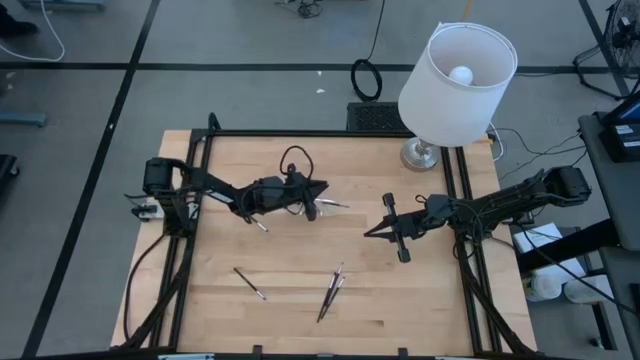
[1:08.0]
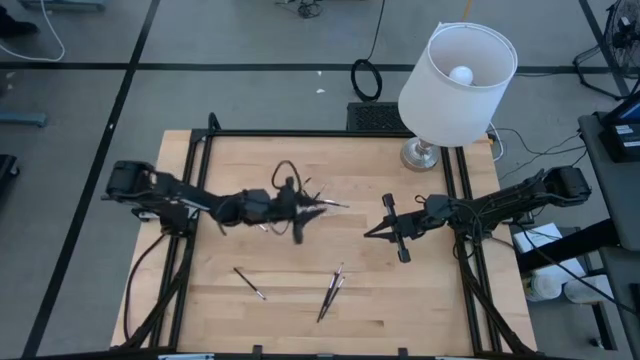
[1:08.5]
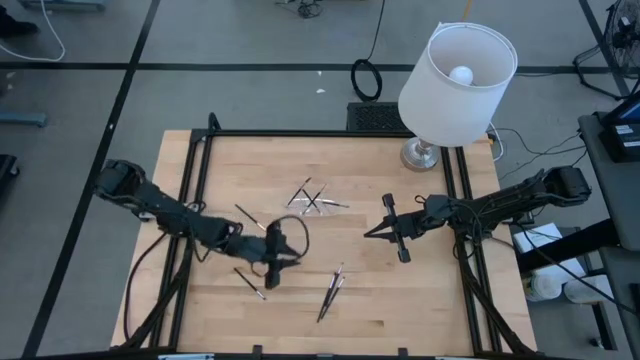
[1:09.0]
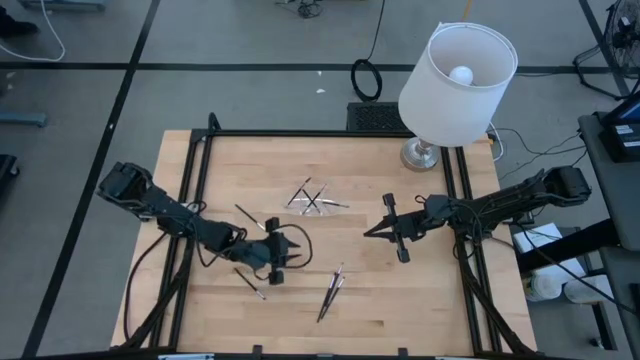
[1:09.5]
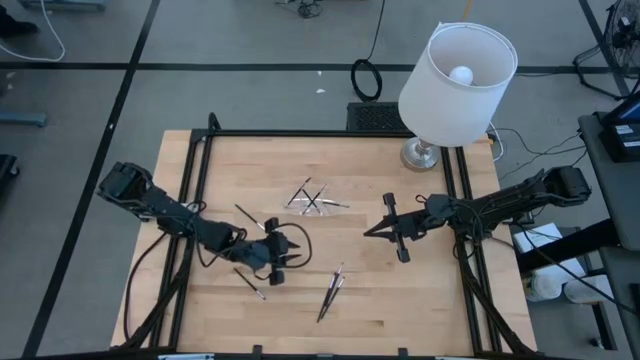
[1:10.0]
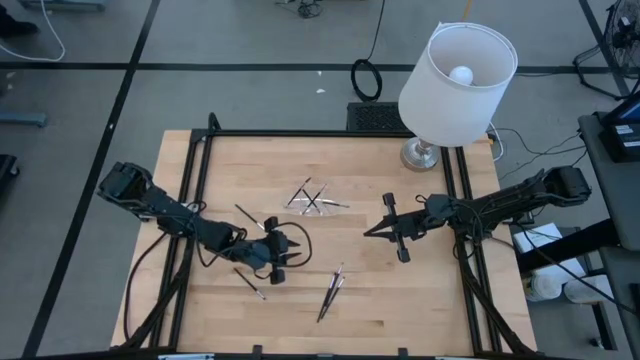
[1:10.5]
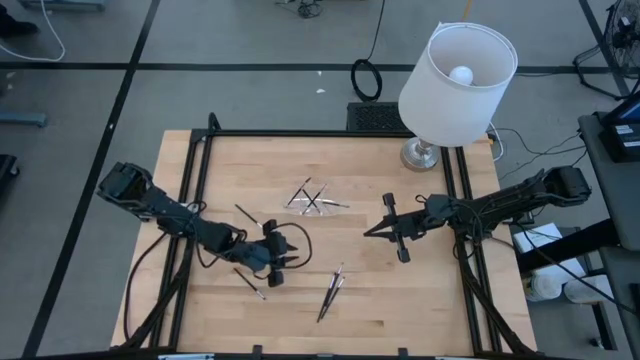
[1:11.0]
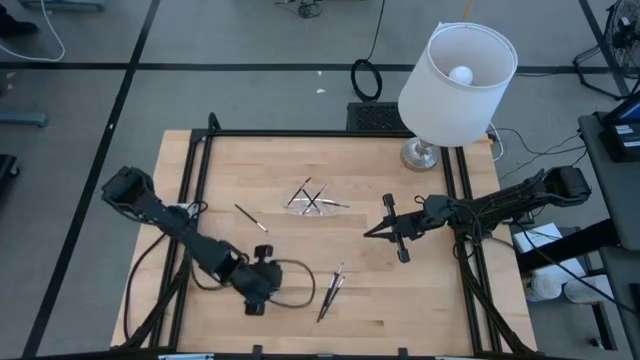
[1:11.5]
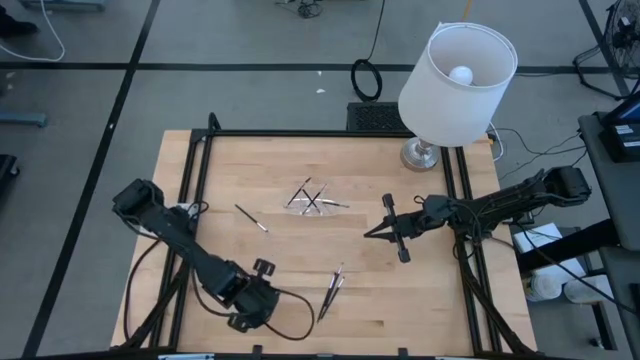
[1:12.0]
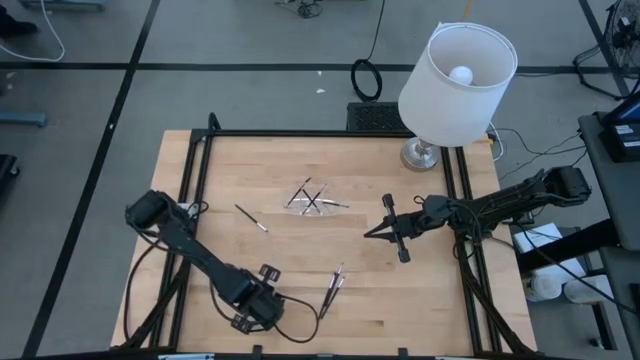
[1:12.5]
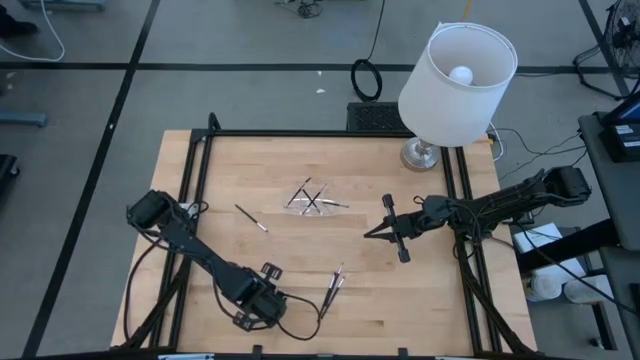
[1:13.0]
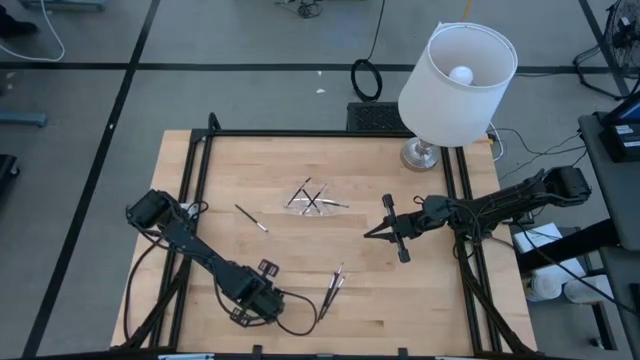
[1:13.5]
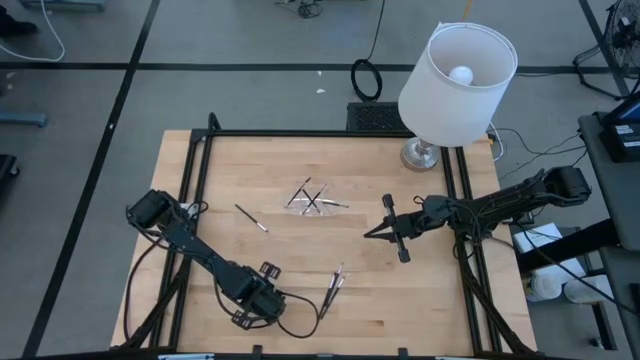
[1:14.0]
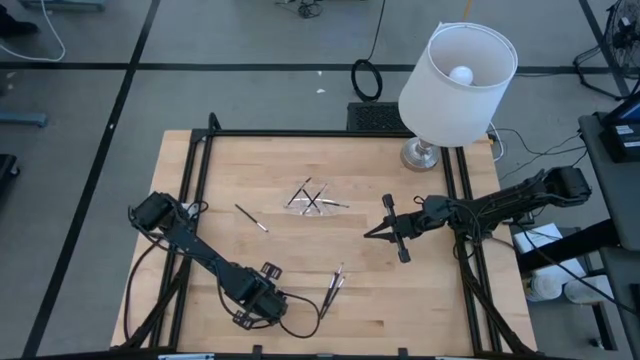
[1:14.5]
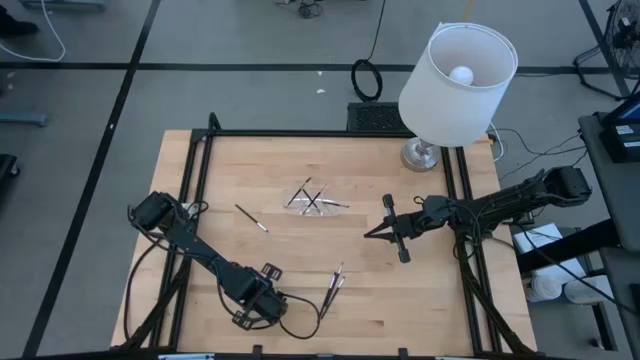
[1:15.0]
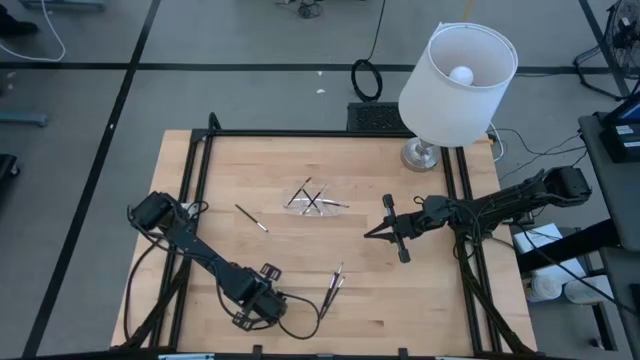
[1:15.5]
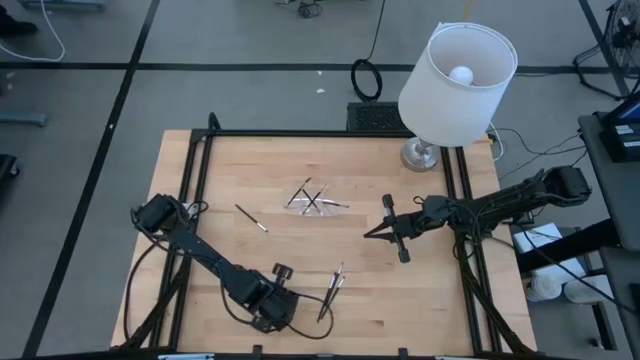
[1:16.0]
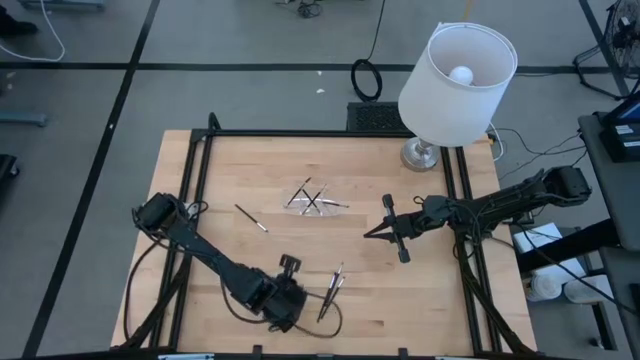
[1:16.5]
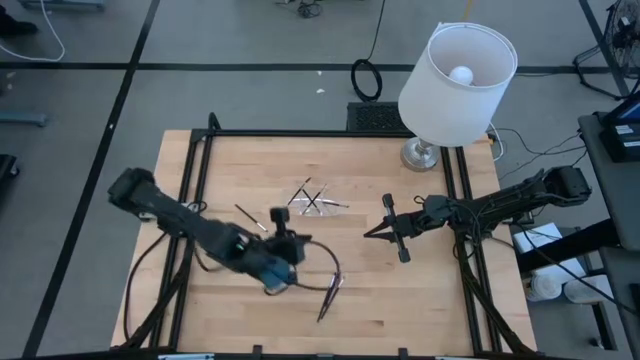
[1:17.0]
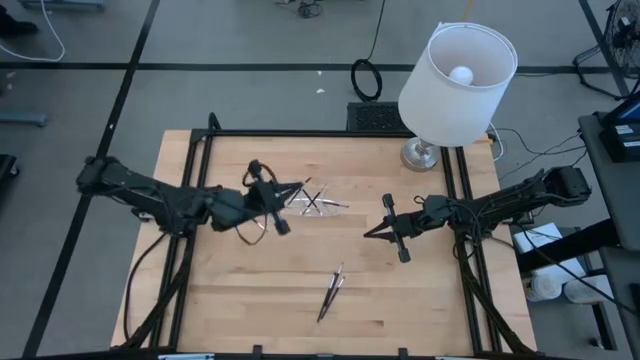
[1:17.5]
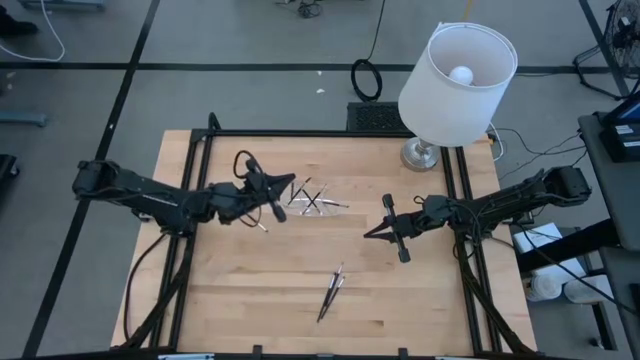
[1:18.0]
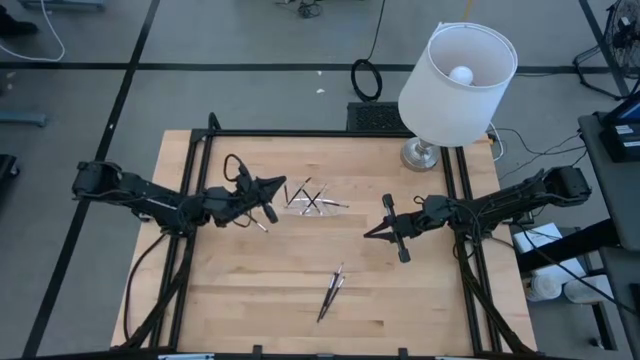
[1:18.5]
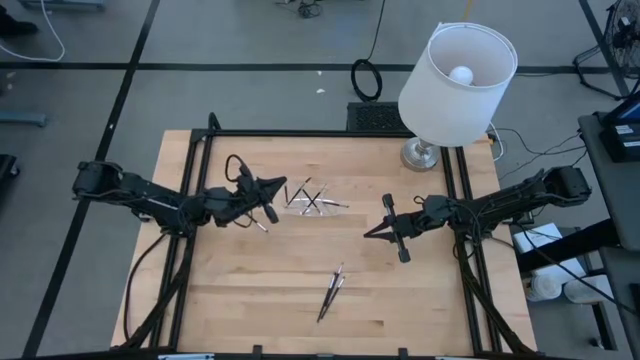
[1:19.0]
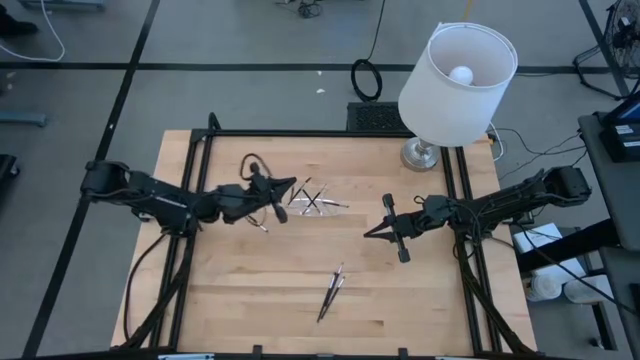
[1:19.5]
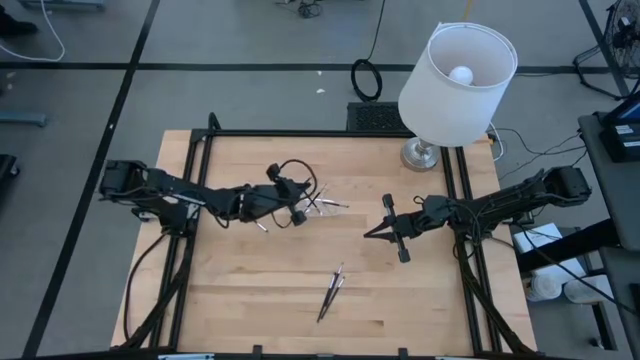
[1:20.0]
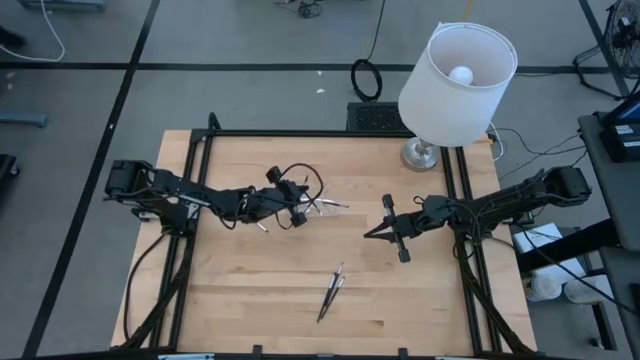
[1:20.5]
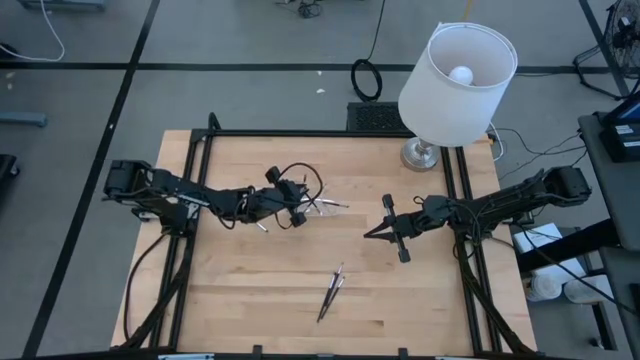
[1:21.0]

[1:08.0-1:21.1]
Task: Put items in baskets/containers
Put the black eyeshadow brush into the transparent organizer

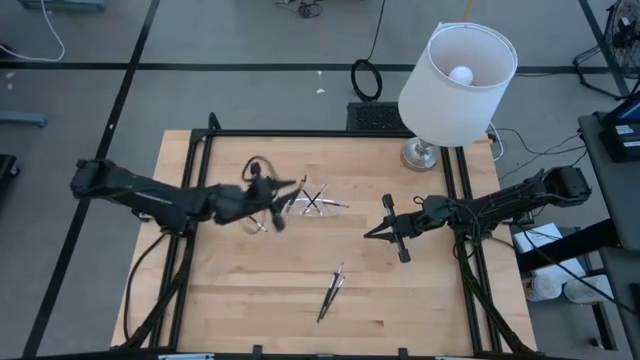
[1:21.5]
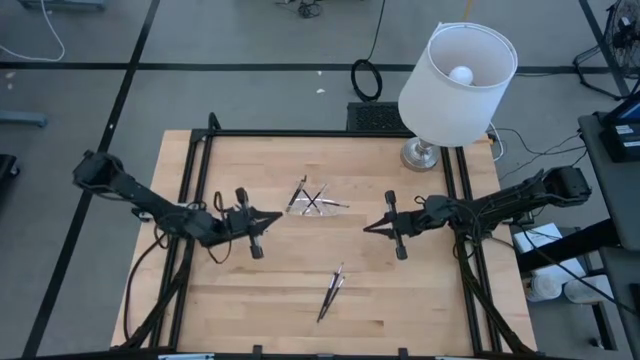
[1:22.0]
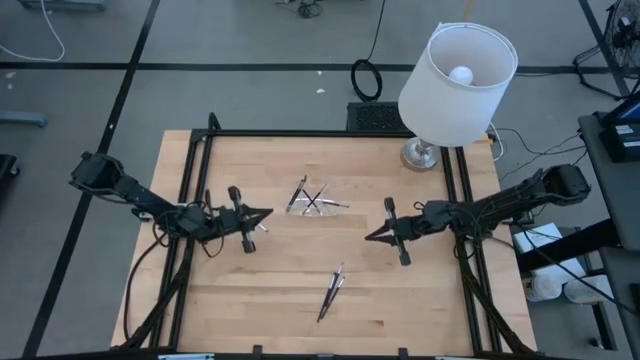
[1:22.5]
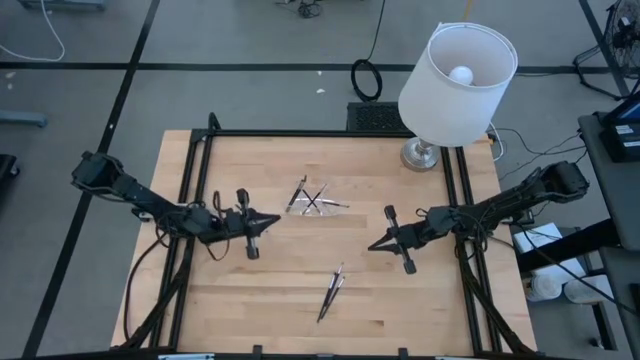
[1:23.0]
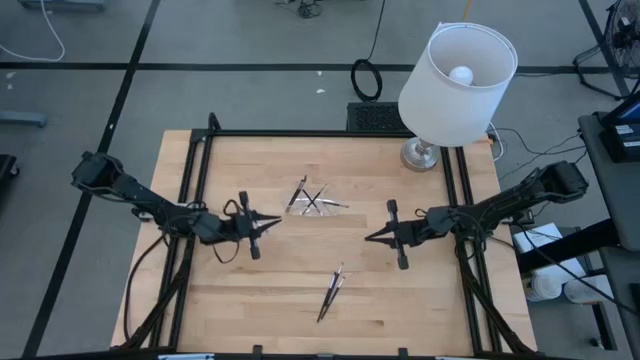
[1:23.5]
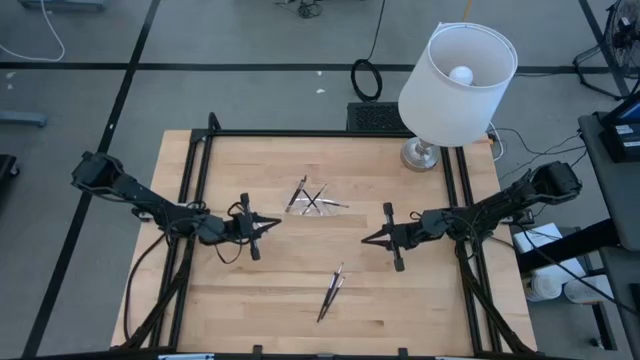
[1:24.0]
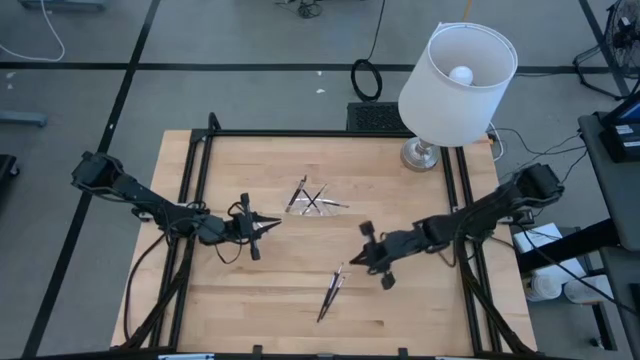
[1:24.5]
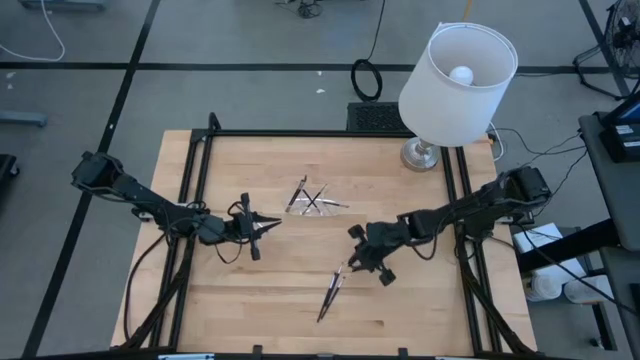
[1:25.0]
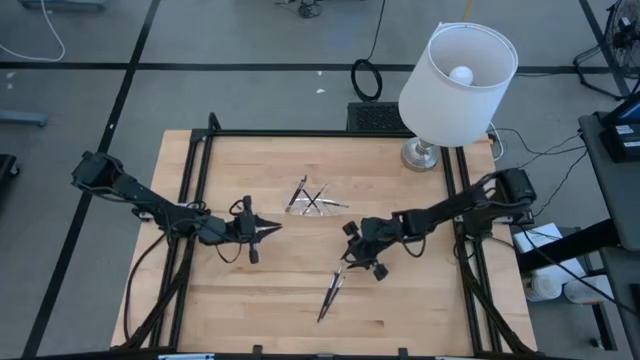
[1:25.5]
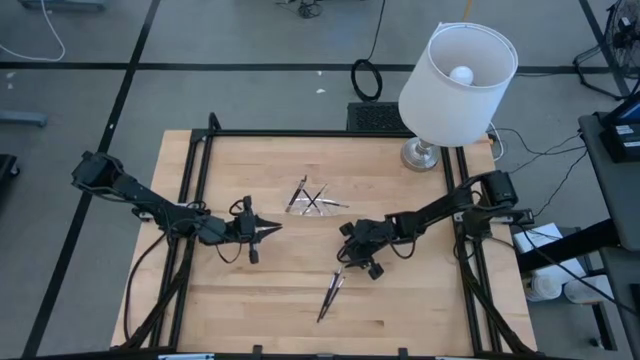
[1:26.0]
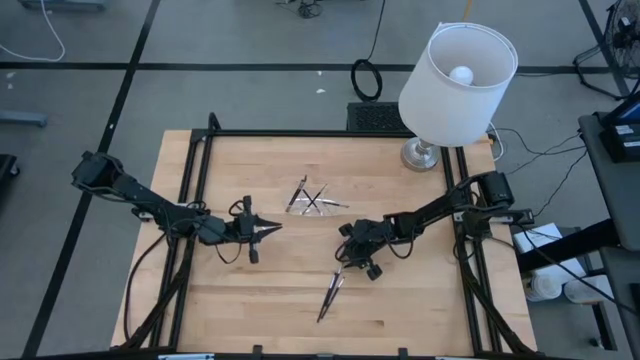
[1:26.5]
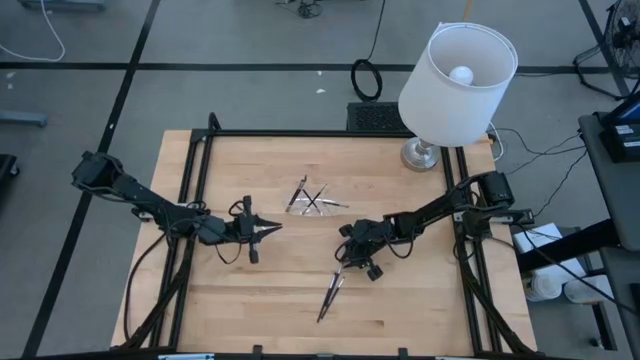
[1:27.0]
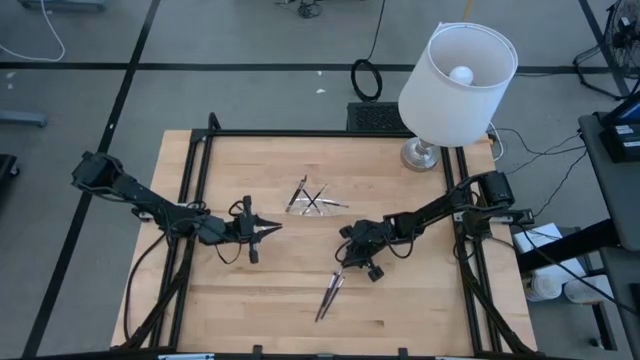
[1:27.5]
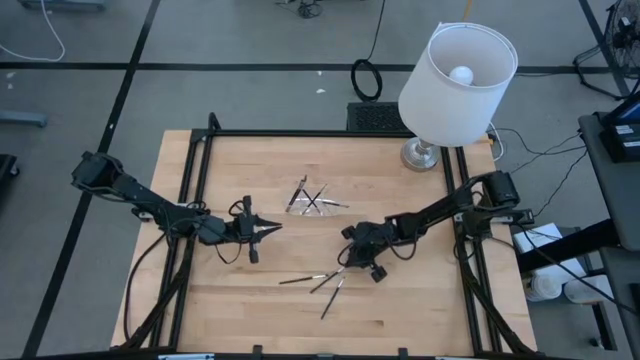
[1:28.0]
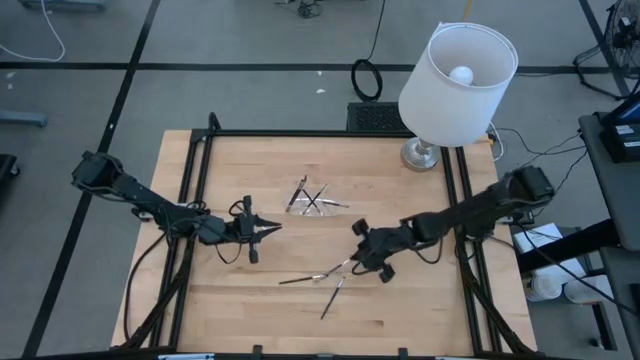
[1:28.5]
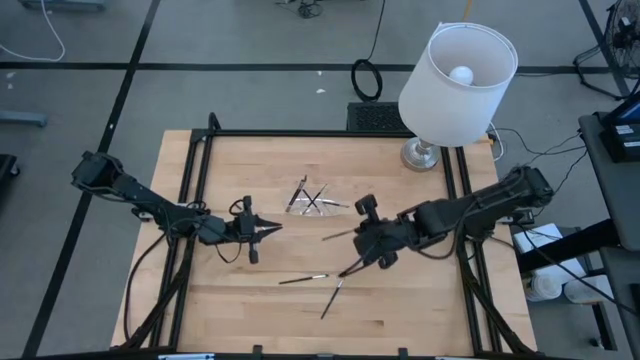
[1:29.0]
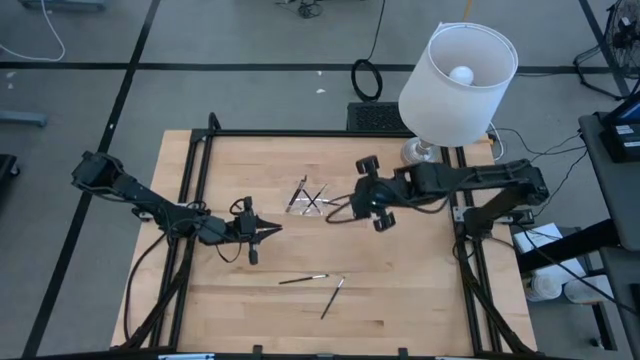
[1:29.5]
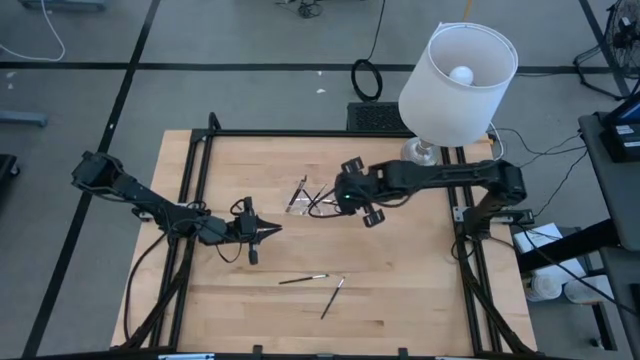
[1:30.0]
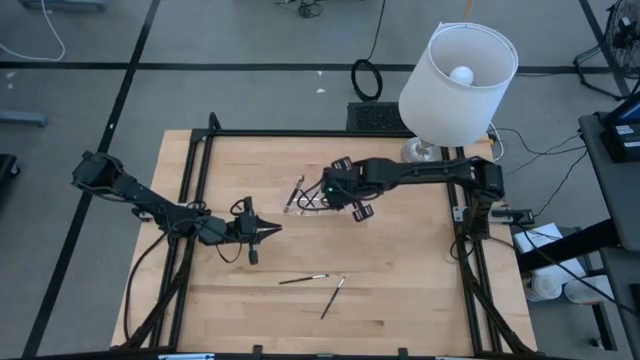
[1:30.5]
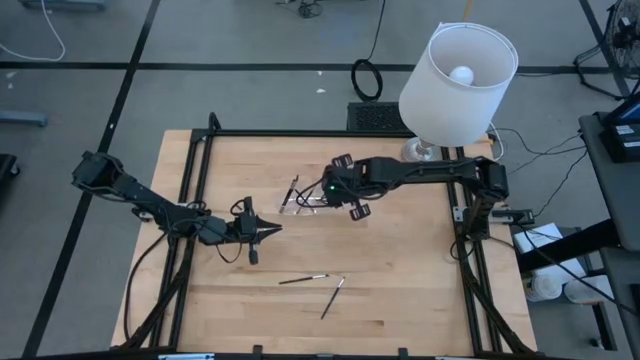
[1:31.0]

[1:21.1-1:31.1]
Put the black eyeshadow brush into the transparent organizer
